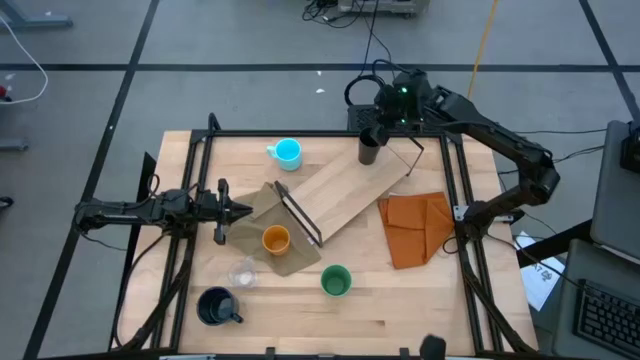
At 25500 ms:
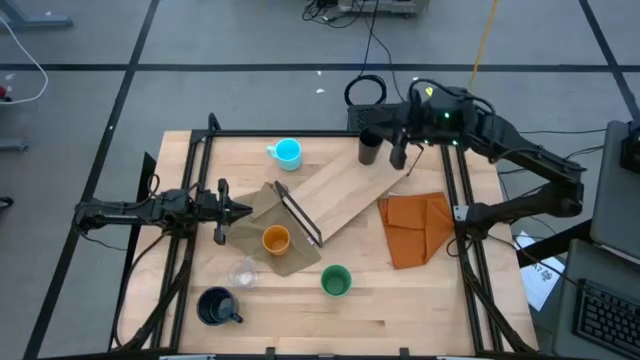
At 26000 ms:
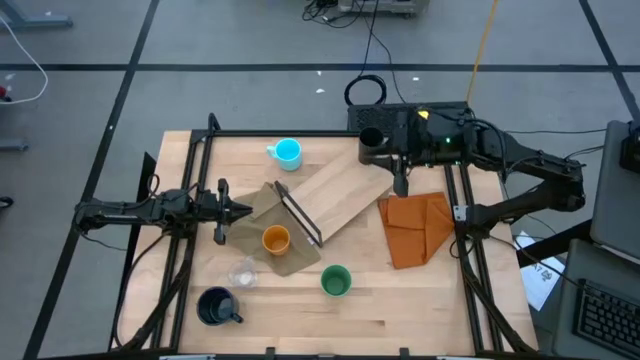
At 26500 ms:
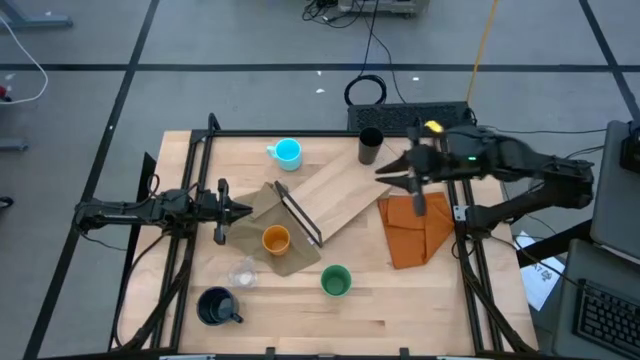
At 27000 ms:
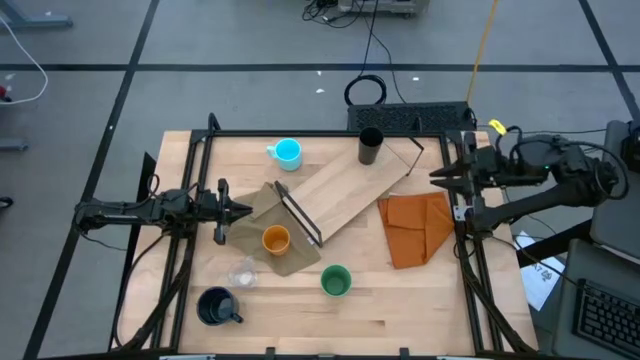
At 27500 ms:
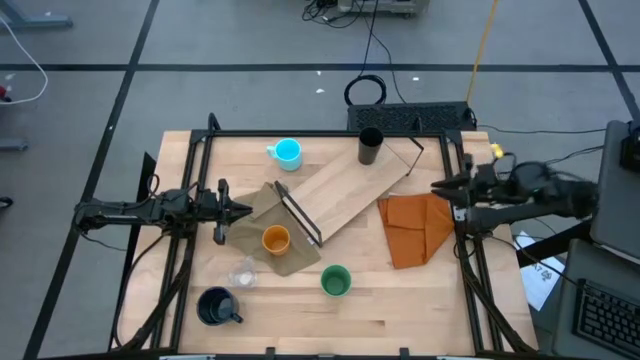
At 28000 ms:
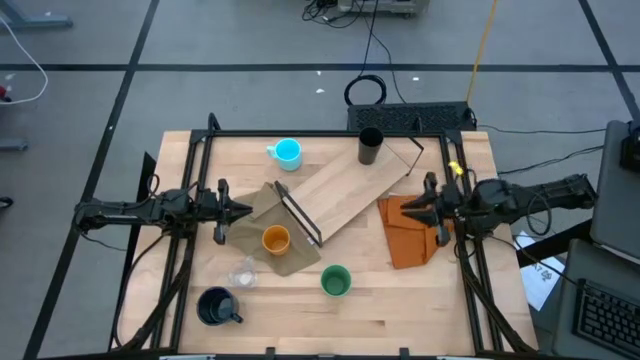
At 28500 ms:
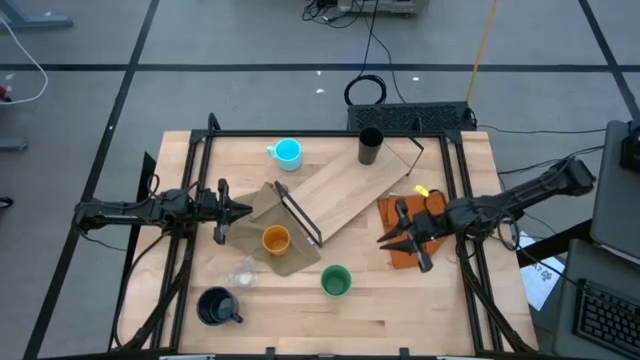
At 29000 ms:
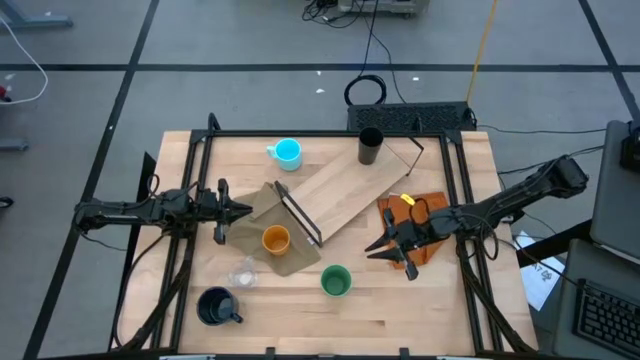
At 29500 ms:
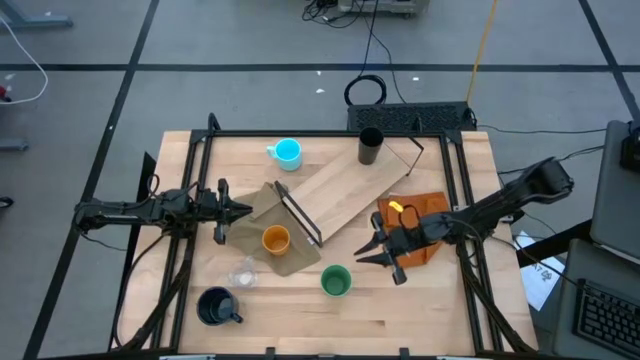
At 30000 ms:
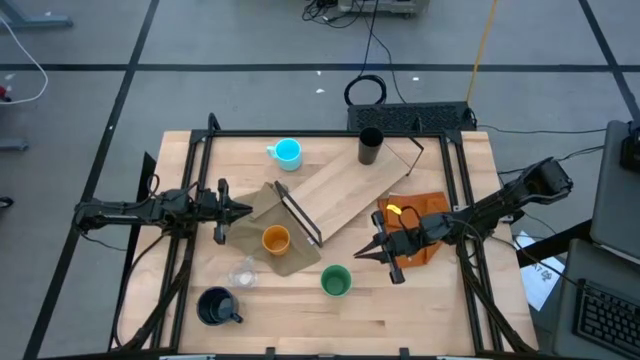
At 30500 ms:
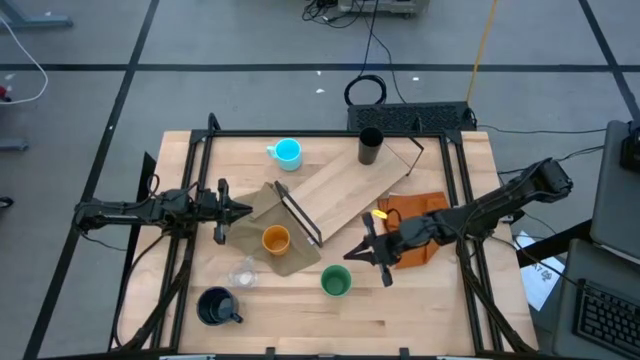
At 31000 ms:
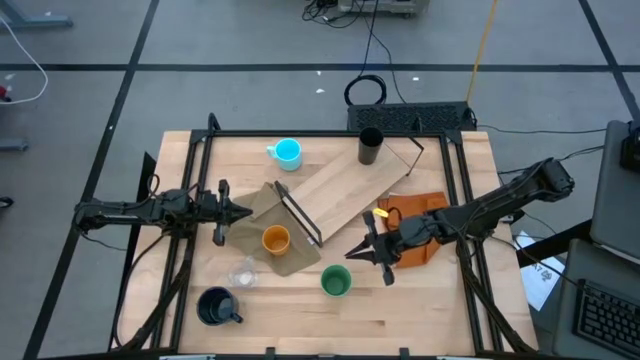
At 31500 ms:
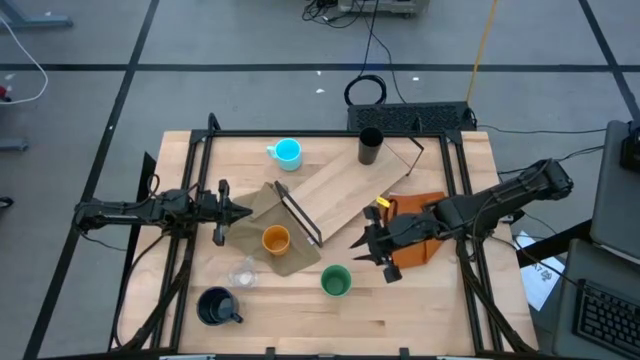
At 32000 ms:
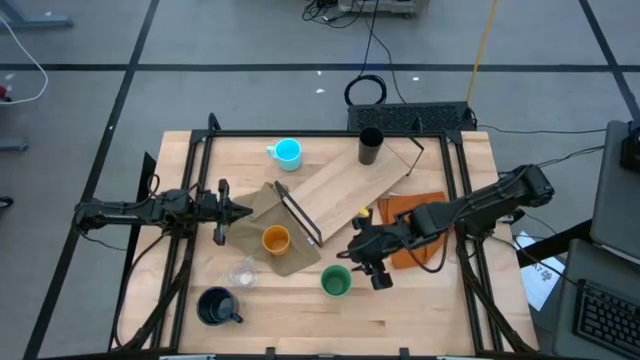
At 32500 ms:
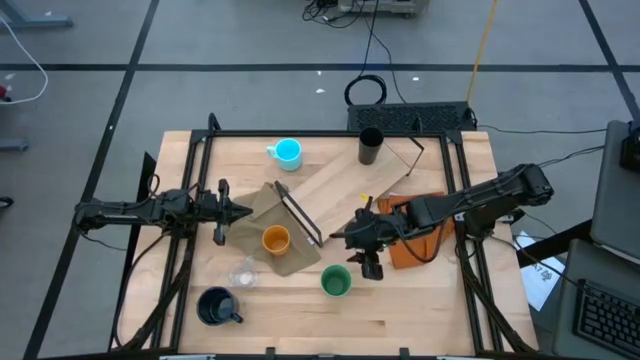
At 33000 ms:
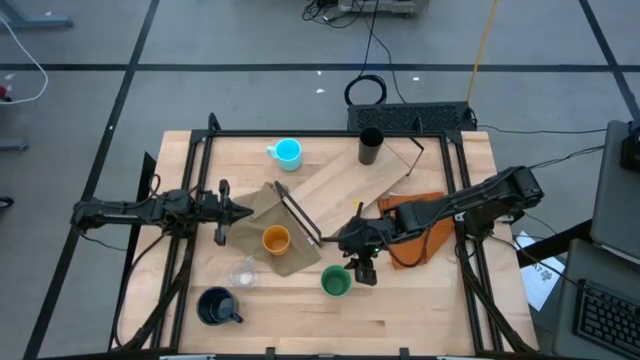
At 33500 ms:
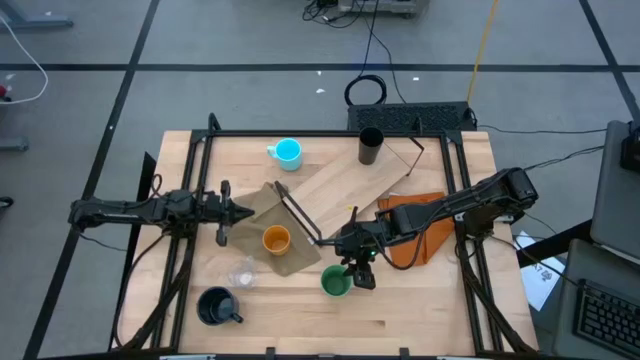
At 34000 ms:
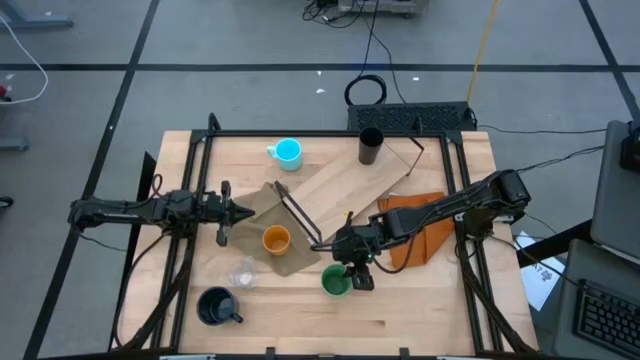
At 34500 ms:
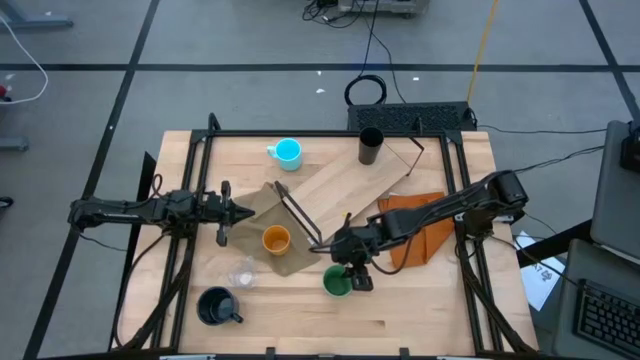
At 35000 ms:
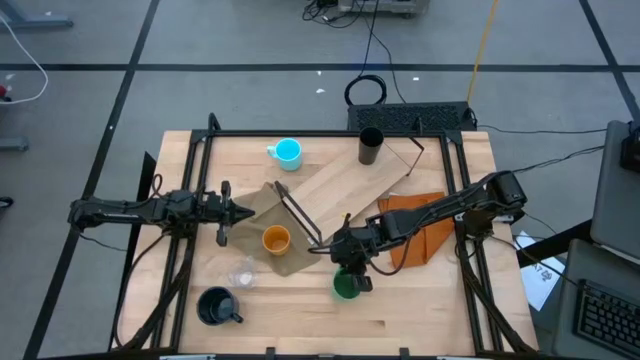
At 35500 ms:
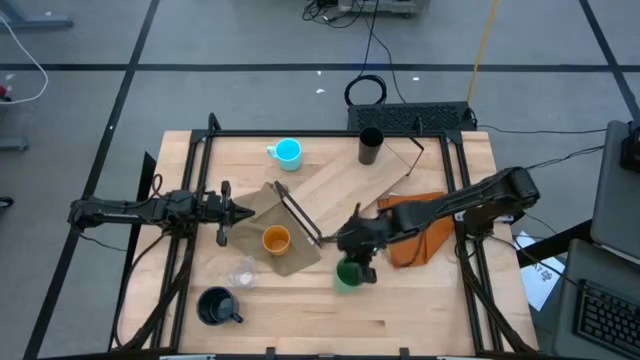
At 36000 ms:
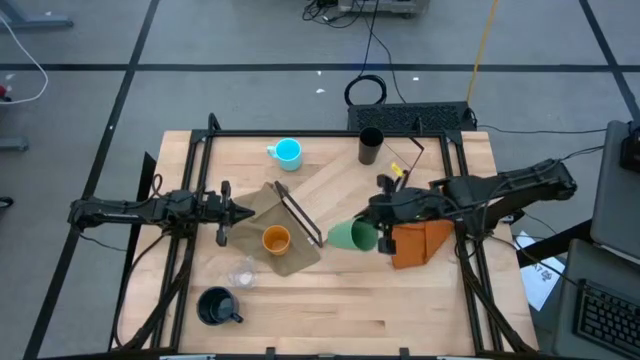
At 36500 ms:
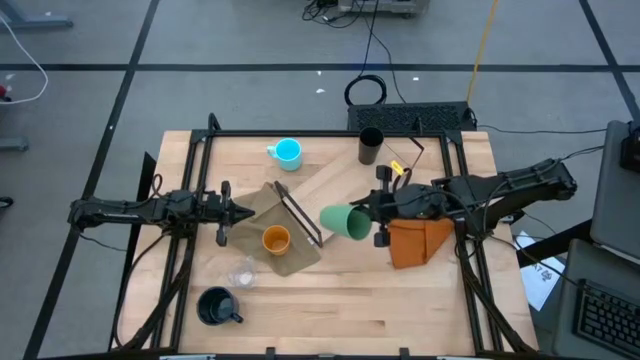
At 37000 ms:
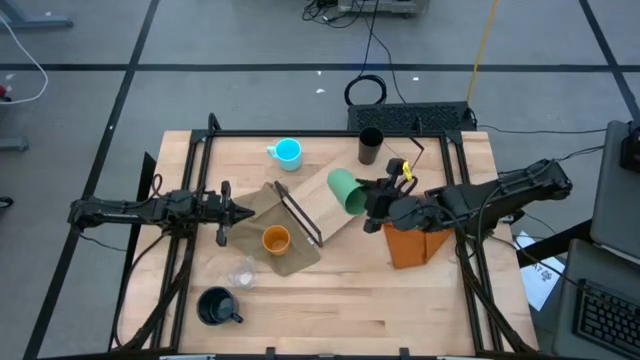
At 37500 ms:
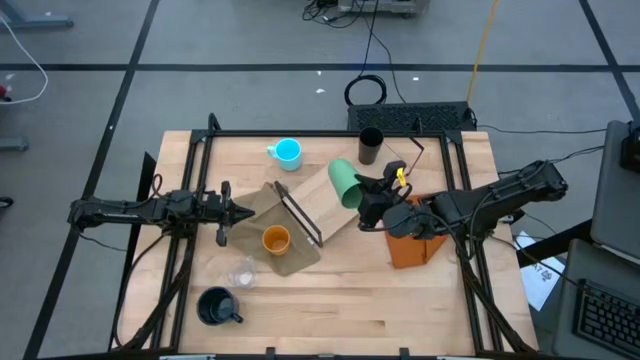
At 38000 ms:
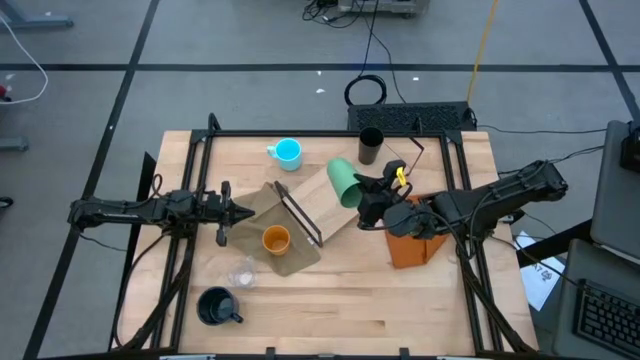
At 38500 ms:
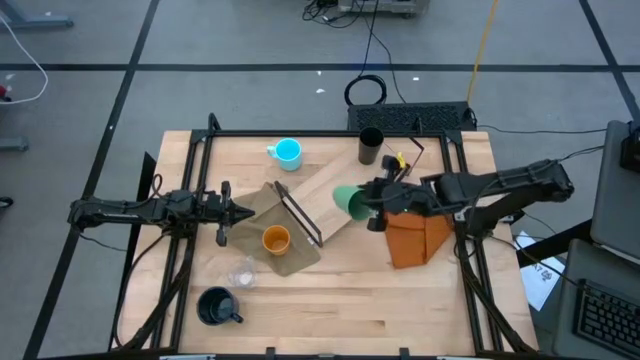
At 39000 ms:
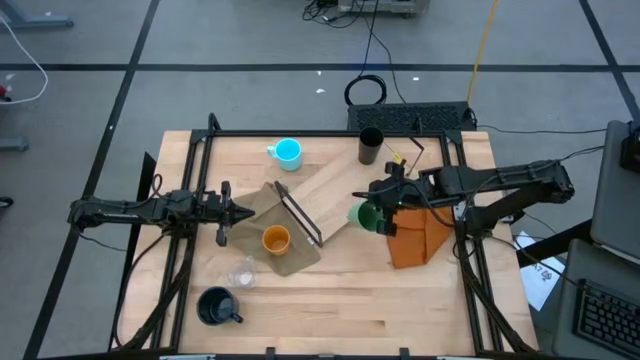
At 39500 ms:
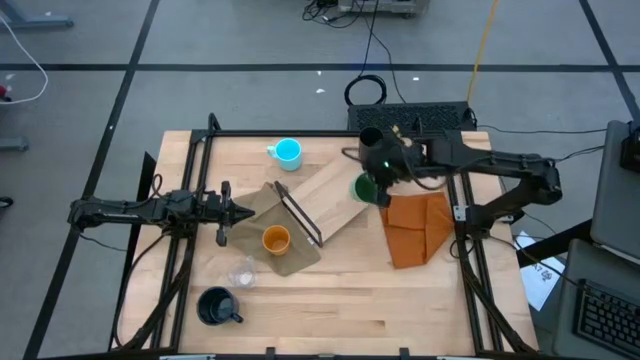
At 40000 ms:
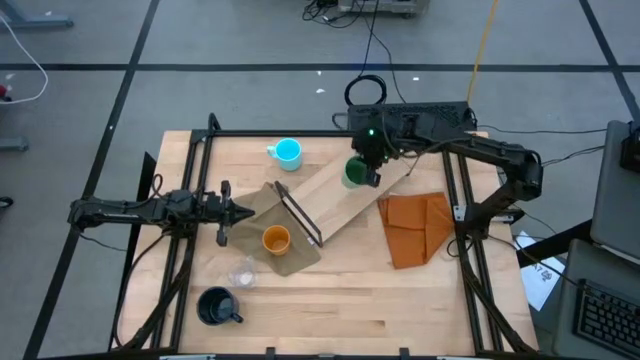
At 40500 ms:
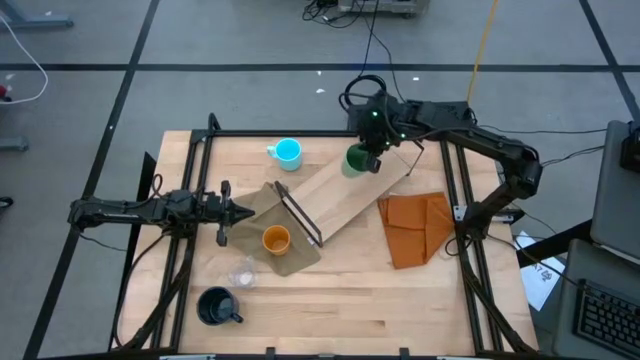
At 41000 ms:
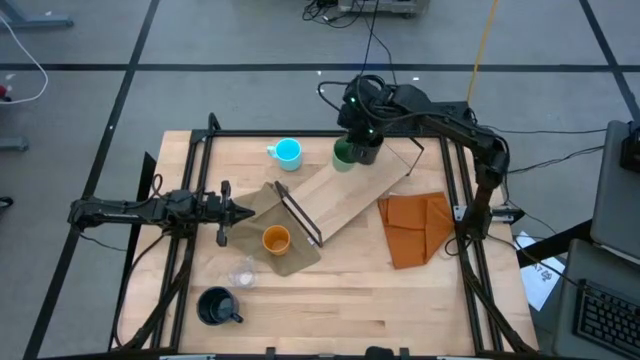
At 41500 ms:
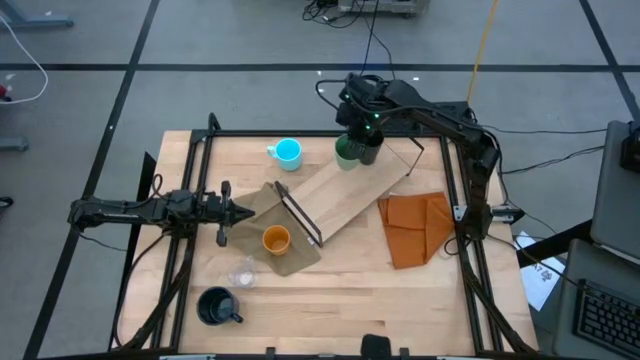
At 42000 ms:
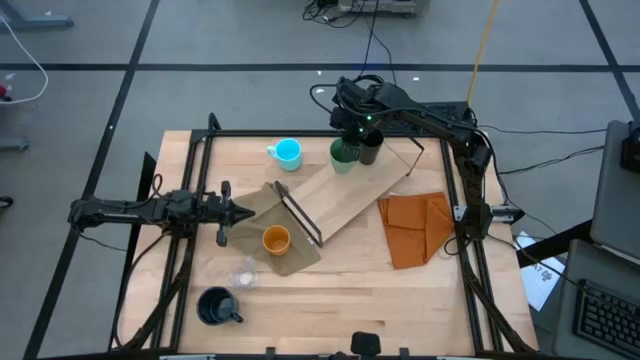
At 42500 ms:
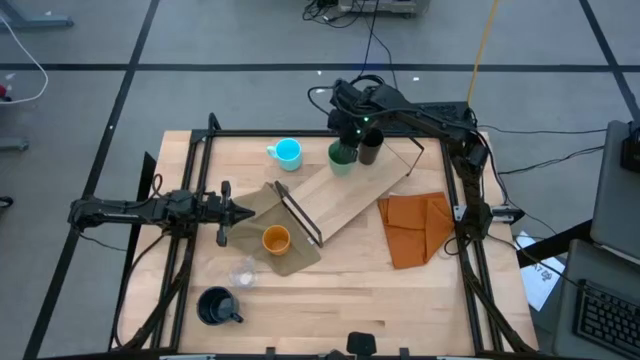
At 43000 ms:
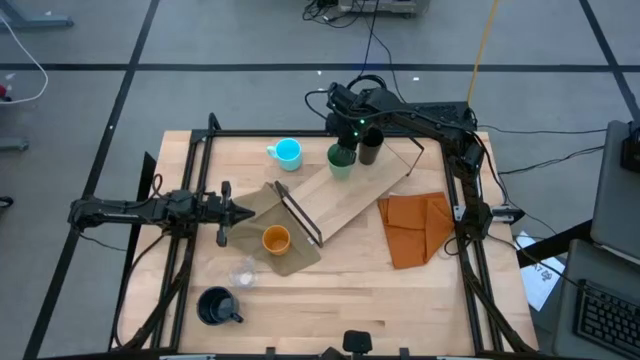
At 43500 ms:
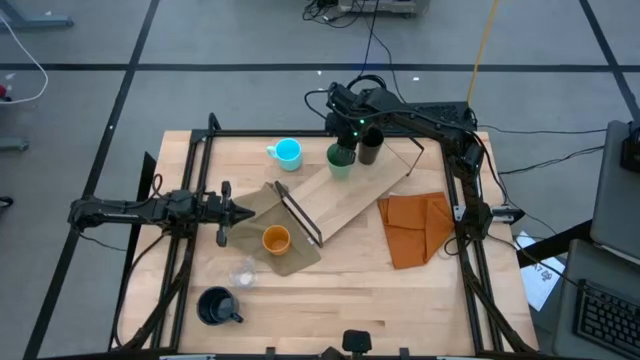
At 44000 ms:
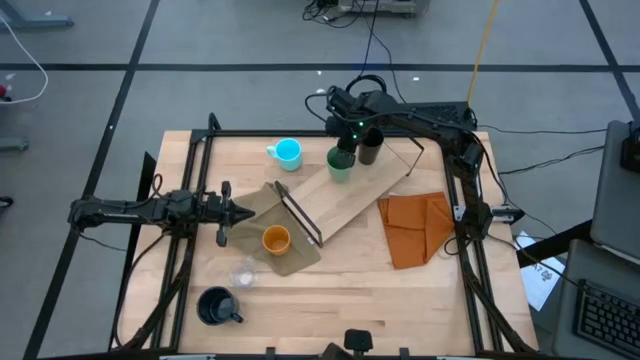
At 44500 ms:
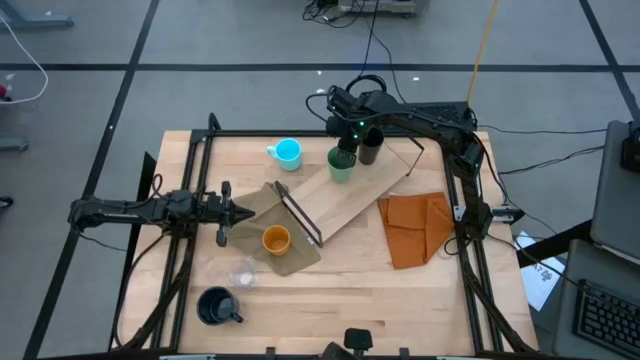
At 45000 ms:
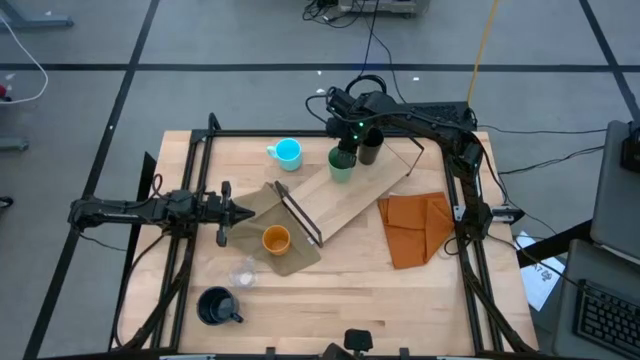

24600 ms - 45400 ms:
Task: Stack small to large cups/mugs on shelf
Put the green cup on the shelf
